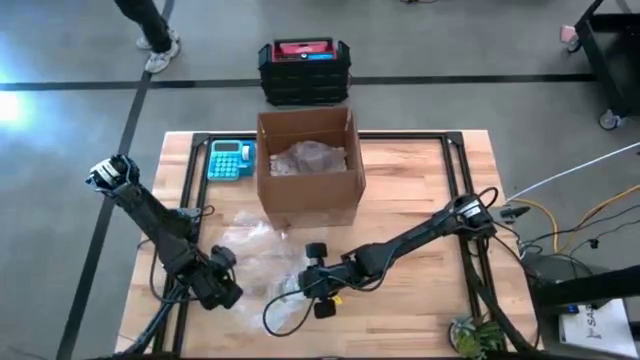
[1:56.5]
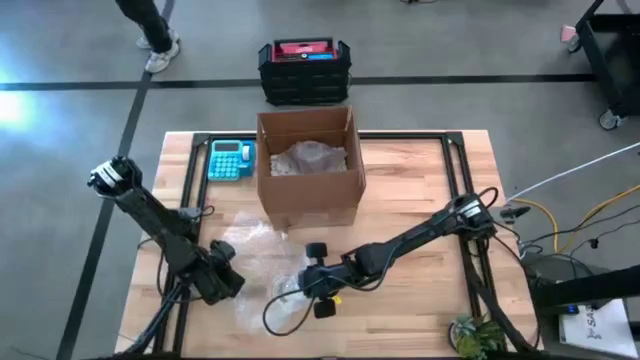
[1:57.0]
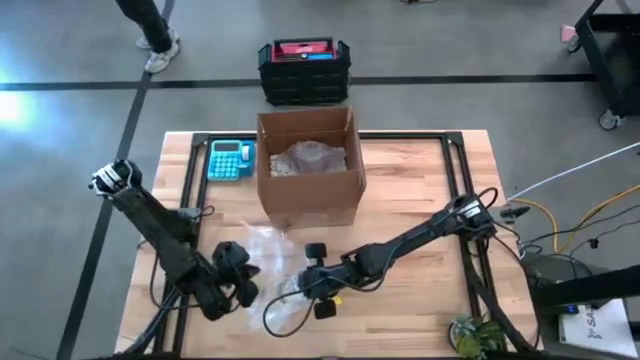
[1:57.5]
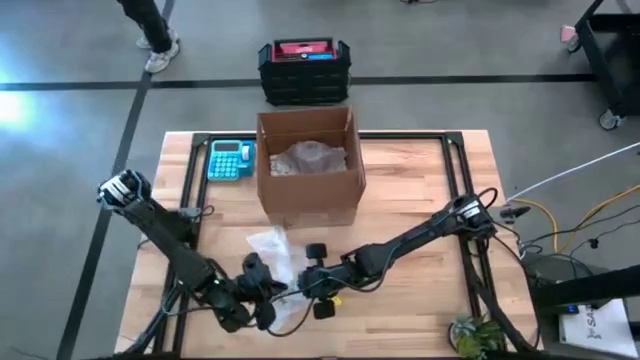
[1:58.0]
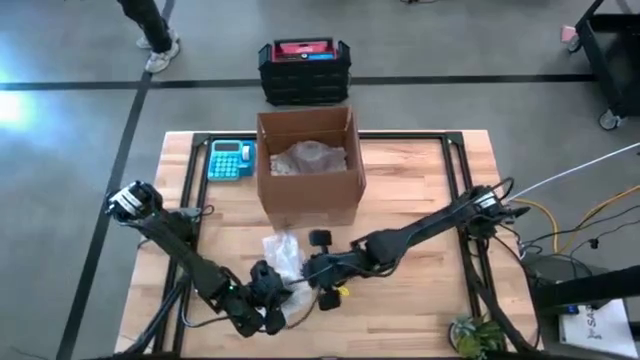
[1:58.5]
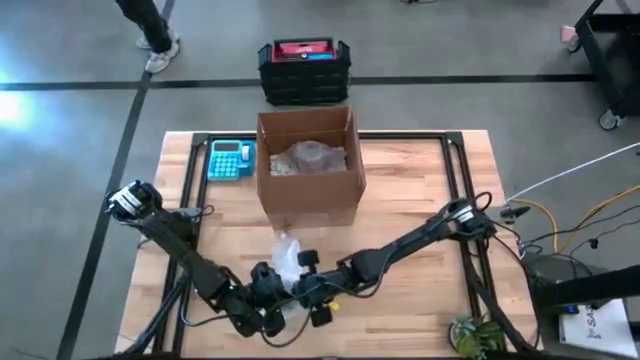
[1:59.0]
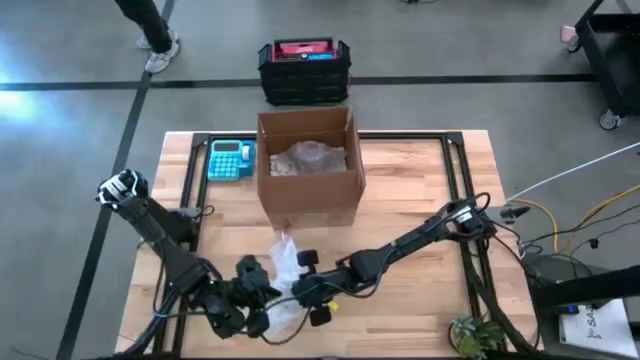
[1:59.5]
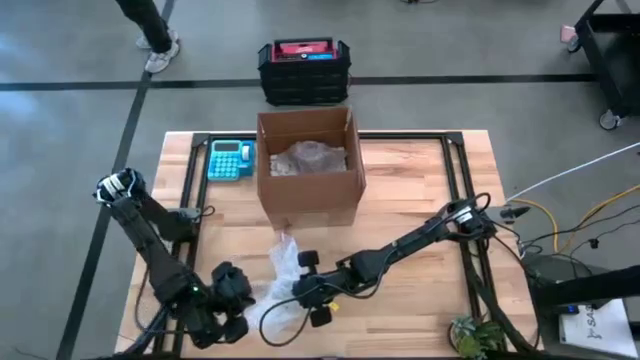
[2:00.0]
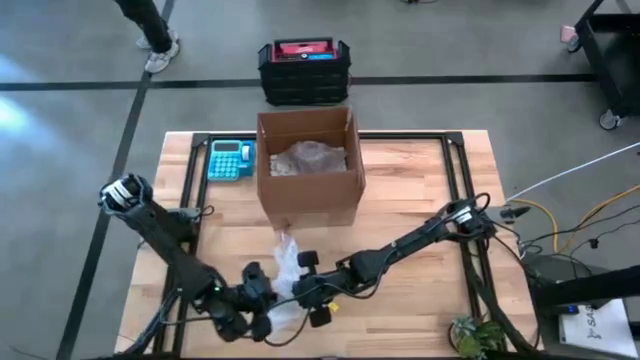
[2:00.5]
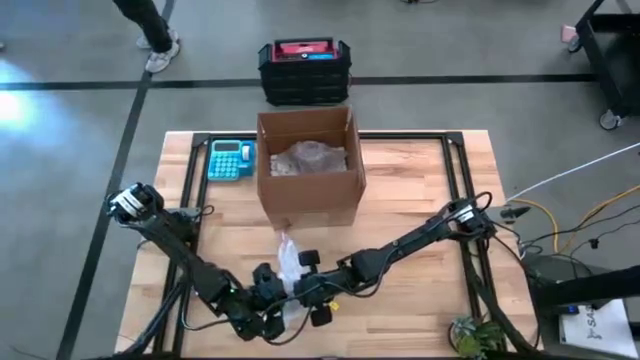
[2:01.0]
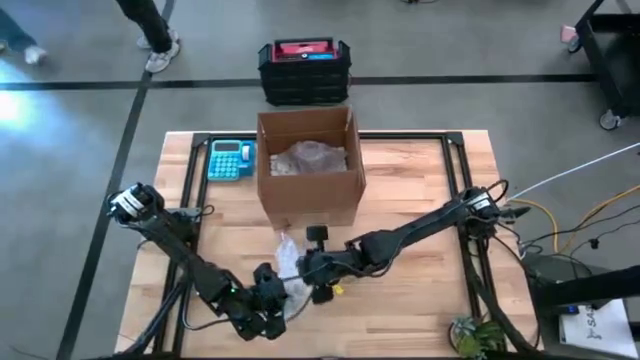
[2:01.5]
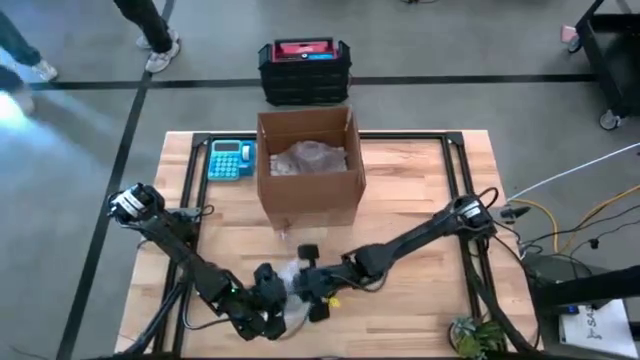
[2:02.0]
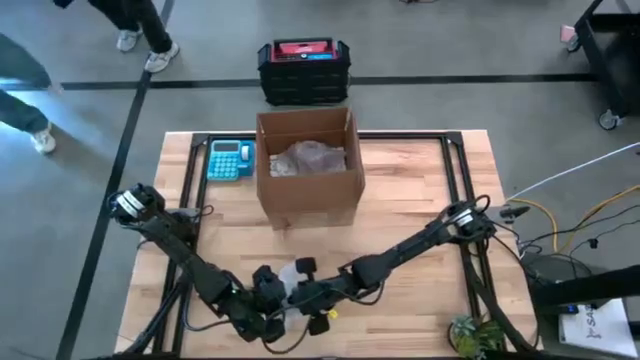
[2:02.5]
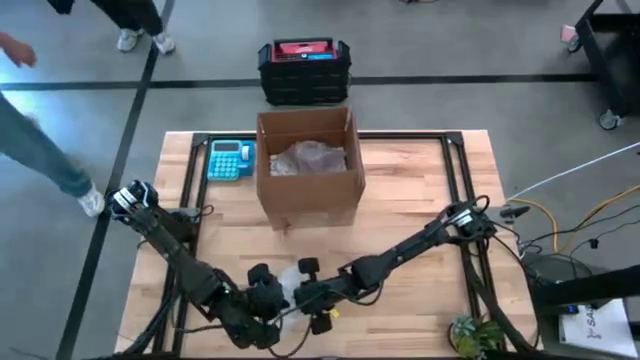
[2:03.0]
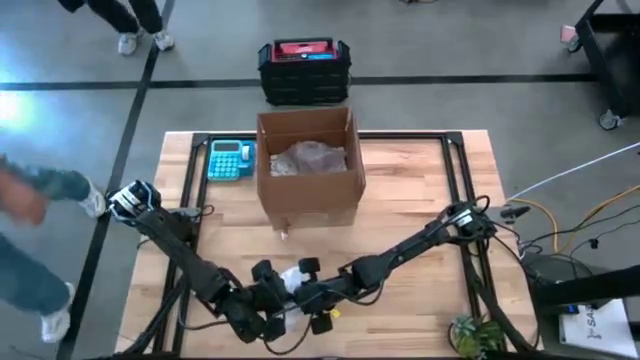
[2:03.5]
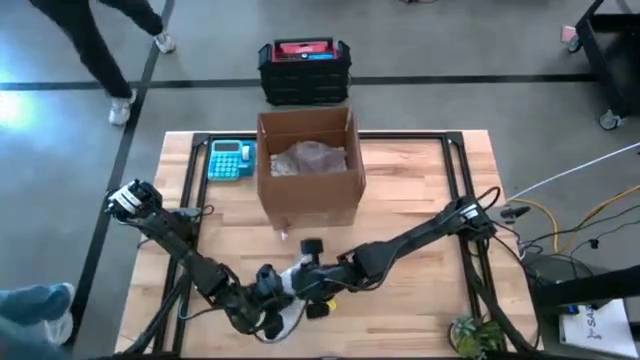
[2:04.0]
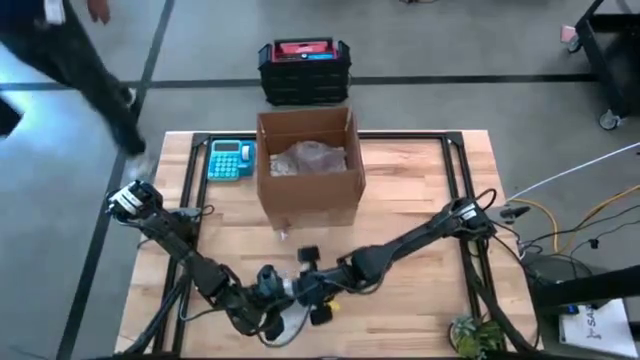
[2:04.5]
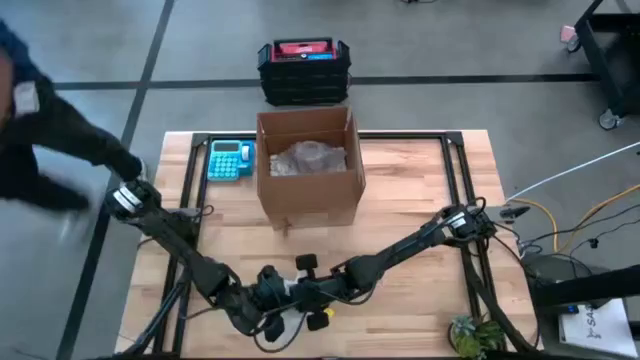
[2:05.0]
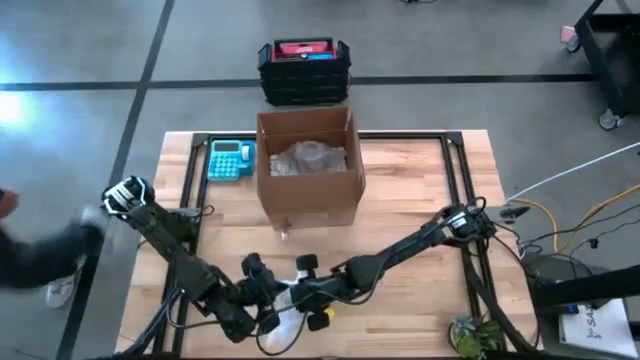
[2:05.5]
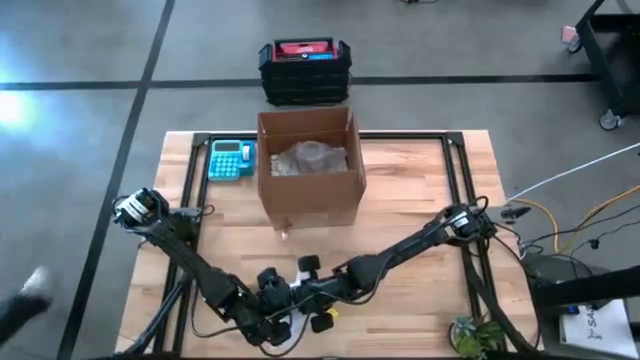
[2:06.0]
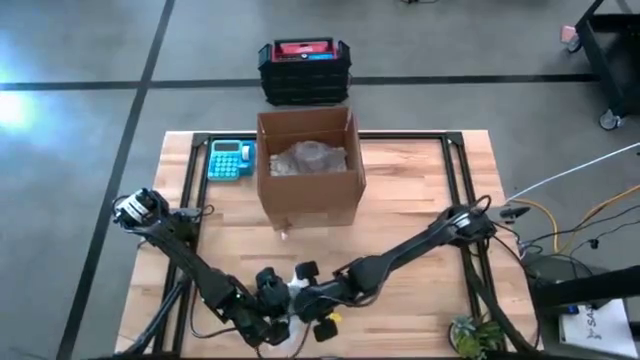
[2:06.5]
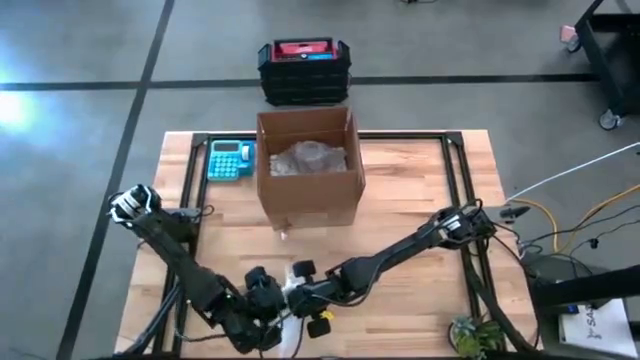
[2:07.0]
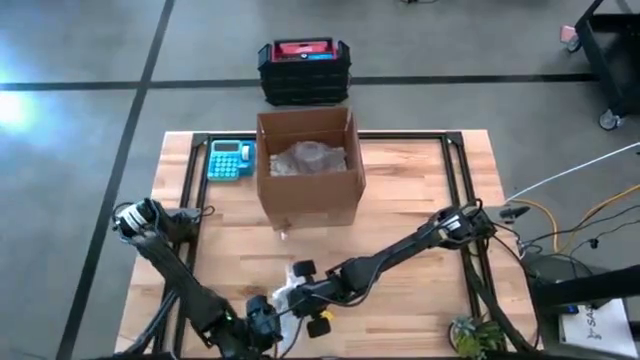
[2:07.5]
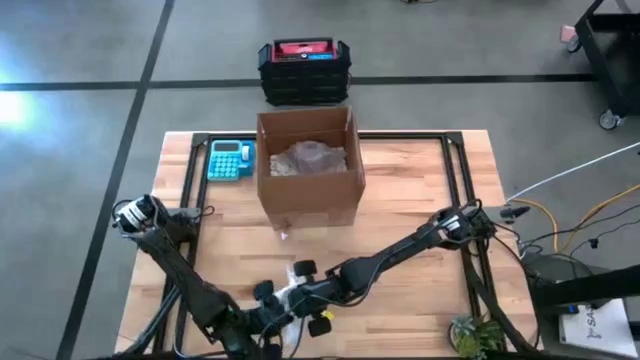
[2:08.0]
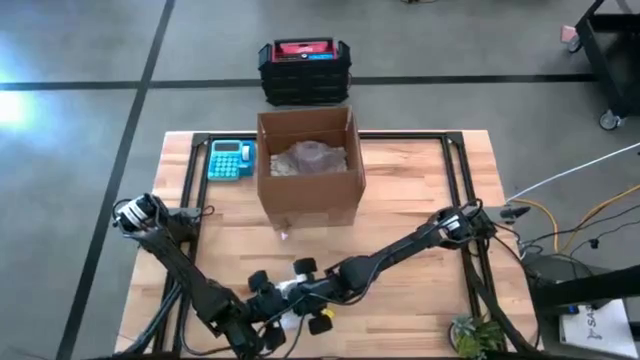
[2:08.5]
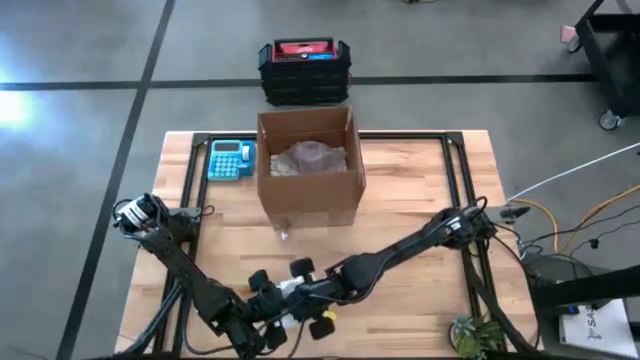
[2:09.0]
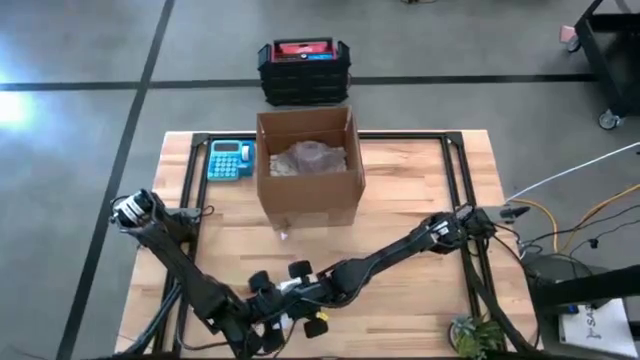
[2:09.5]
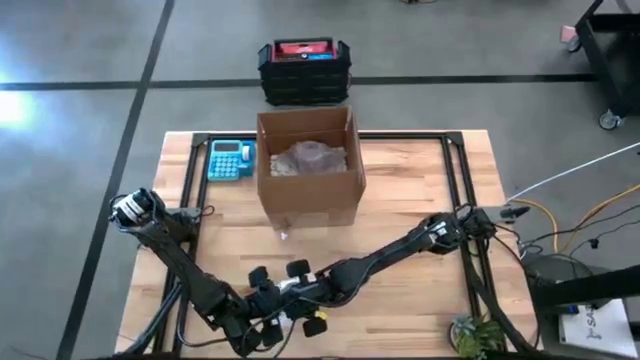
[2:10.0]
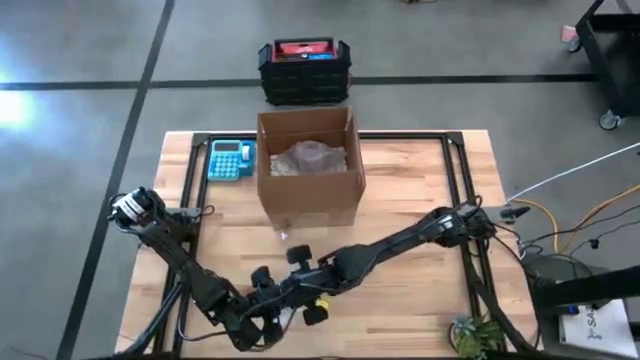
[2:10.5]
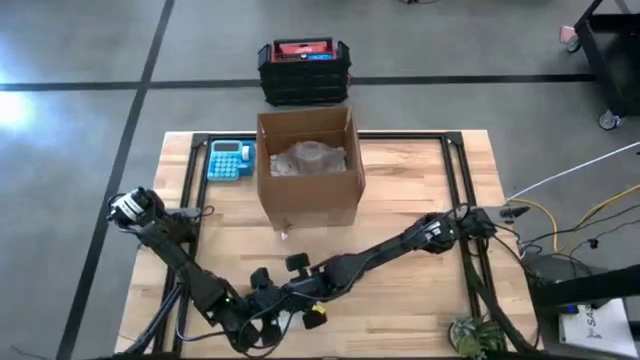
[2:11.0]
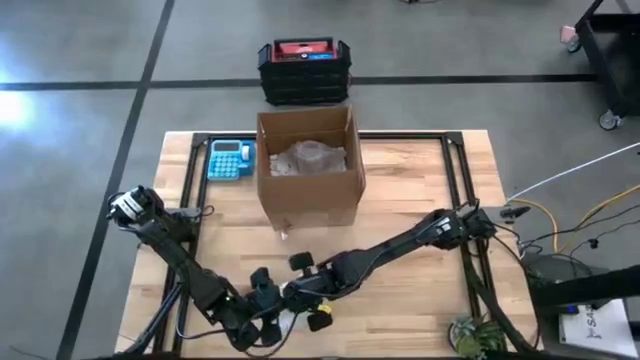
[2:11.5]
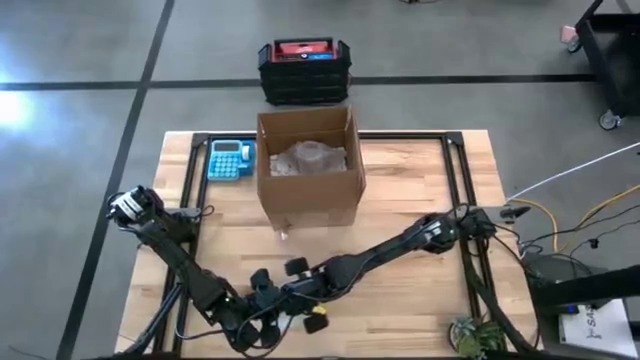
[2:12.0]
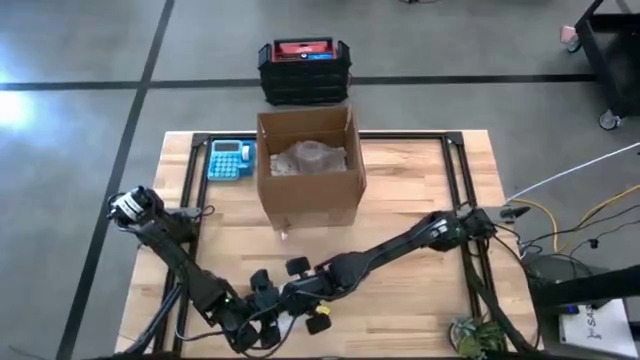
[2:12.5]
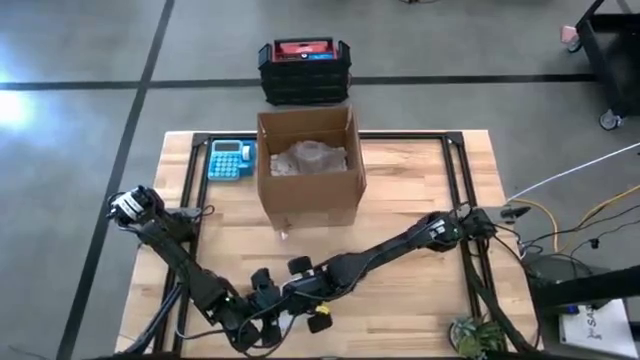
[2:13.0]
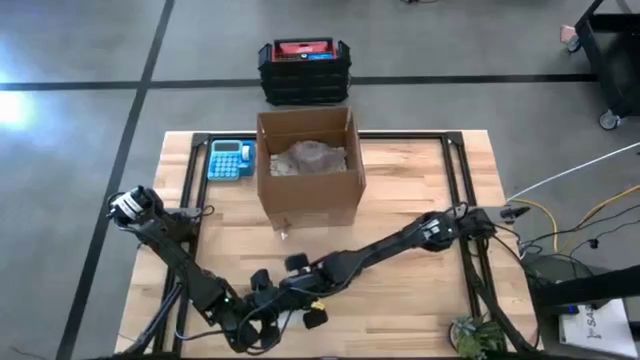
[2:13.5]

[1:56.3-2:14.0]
Task: wrap mug
Wrap the gray mug with transparent bubble wrap

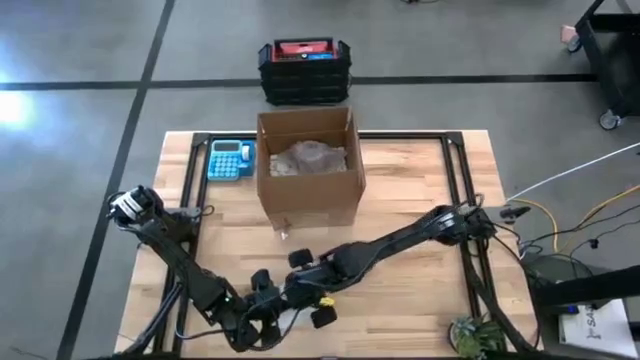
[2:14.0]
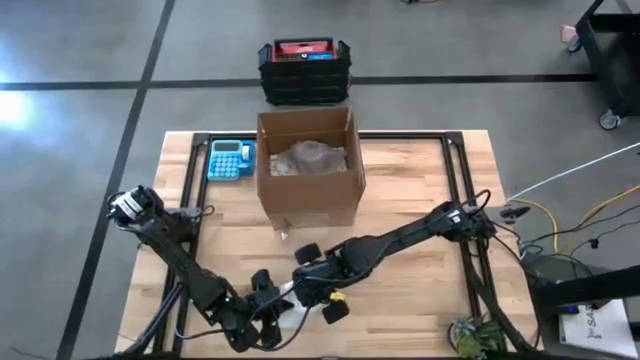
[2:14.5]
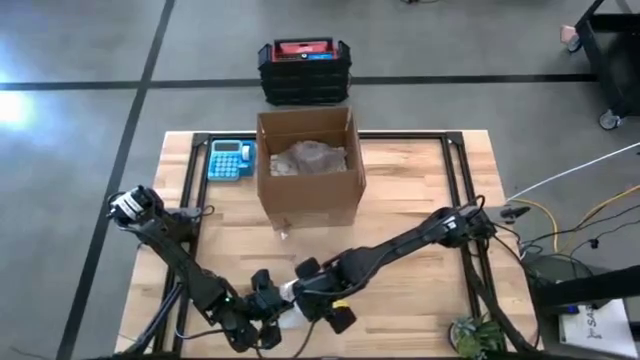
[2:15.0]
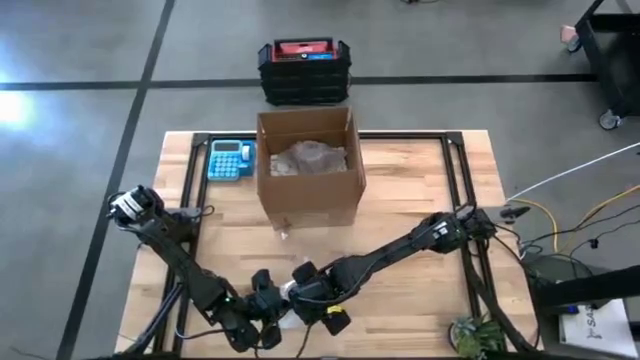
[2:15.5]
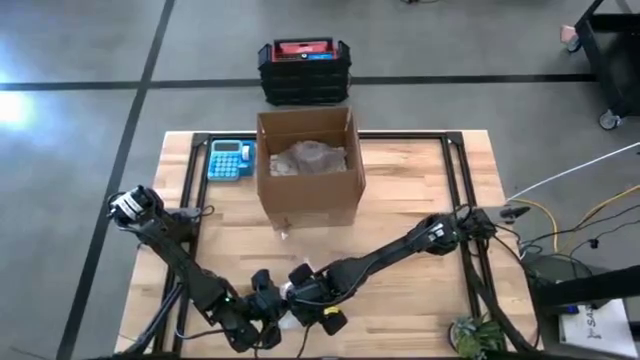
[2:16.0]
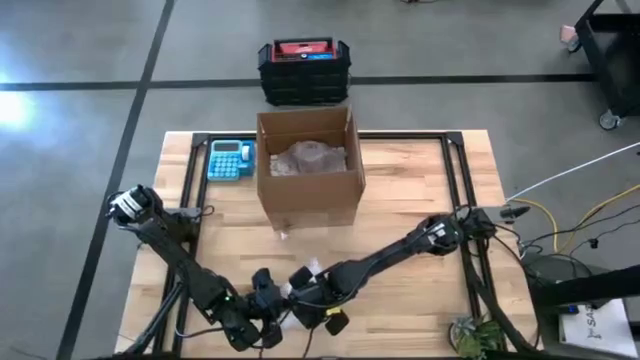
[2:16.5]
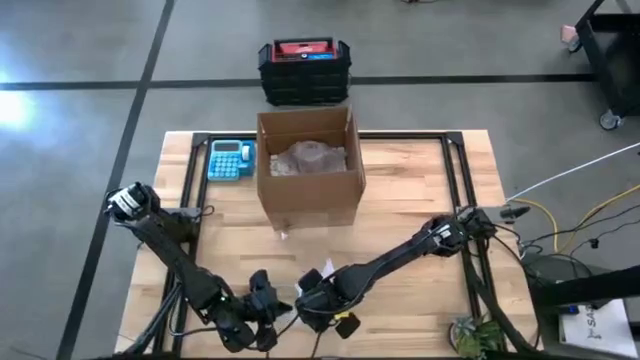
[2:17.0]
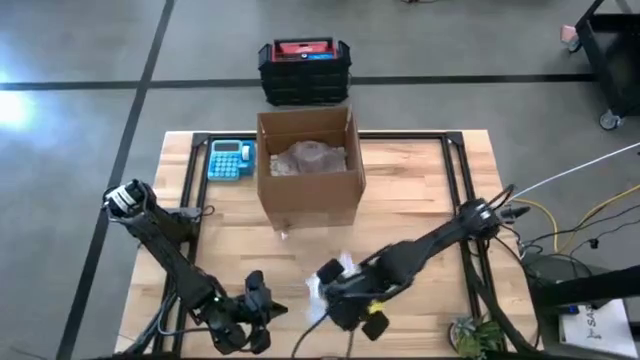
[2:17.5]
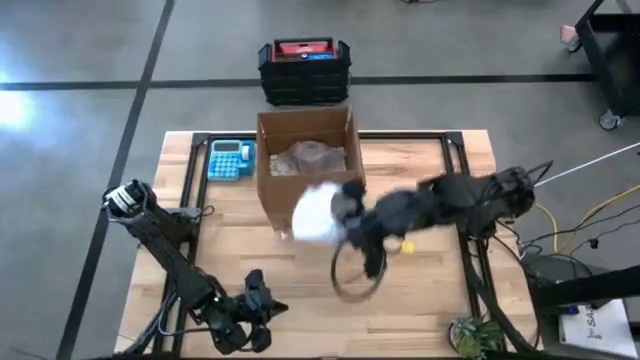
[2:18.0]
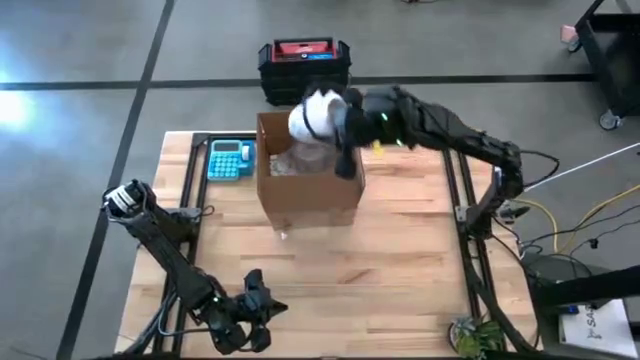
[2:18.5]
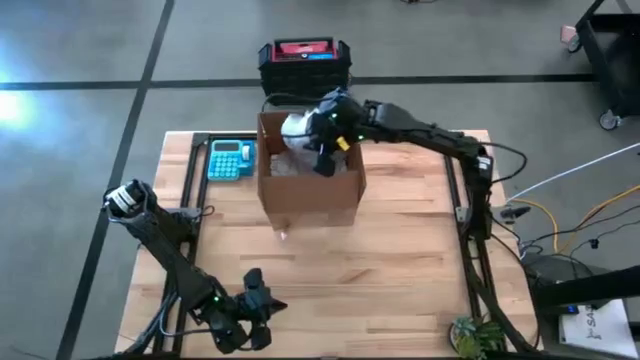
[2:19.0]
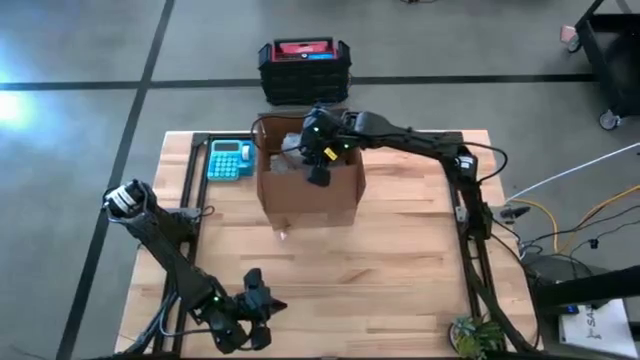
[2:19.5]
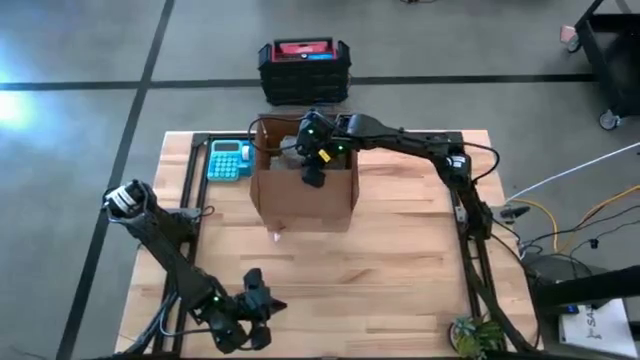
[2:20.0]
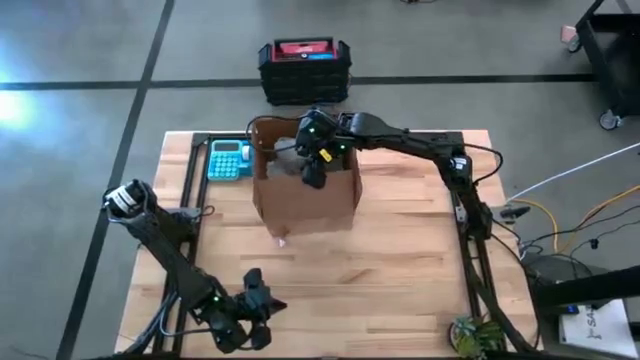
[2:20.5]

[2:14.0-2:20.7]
Put the wrapped gray mug into the cardboard box
